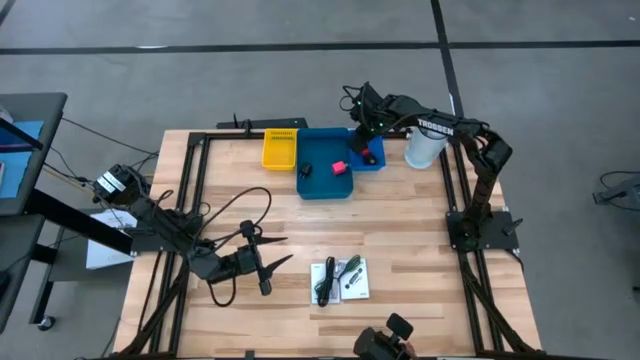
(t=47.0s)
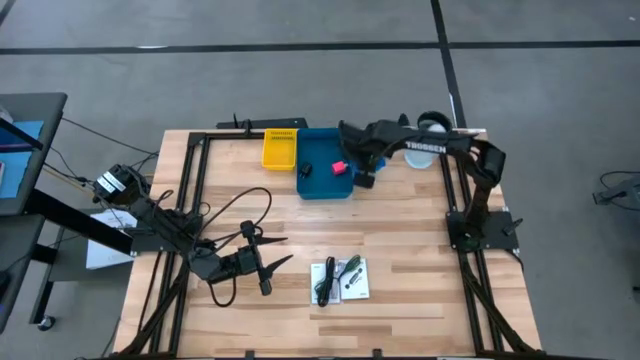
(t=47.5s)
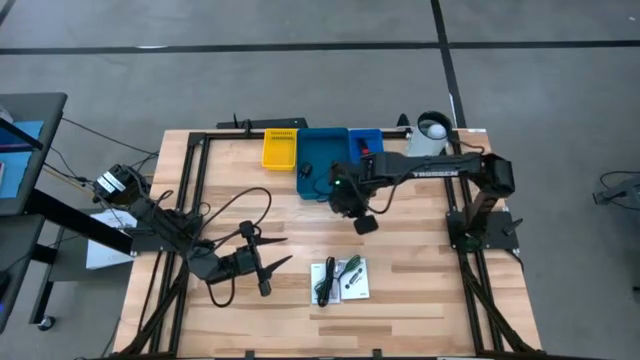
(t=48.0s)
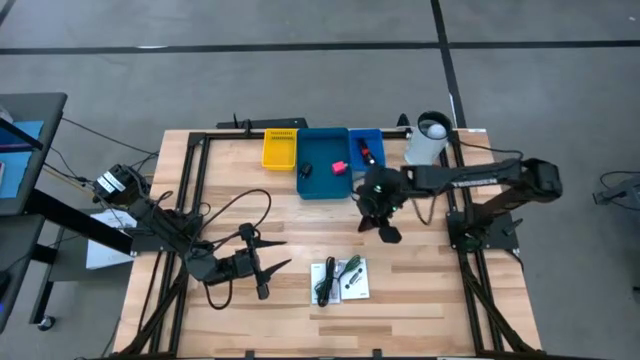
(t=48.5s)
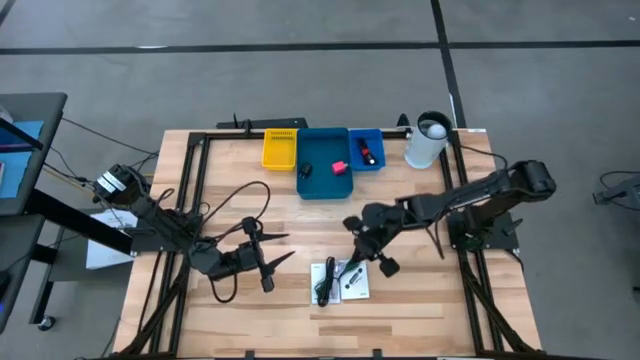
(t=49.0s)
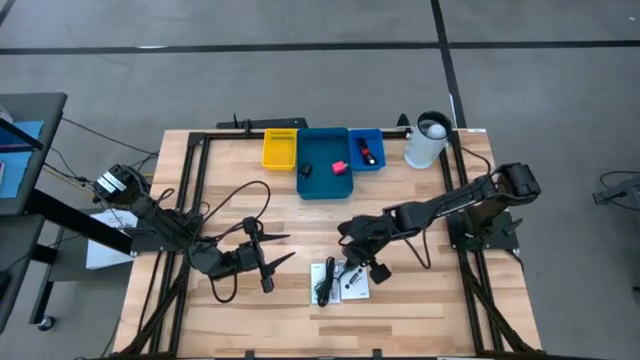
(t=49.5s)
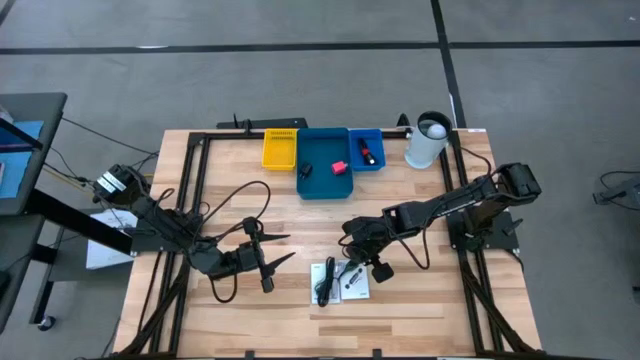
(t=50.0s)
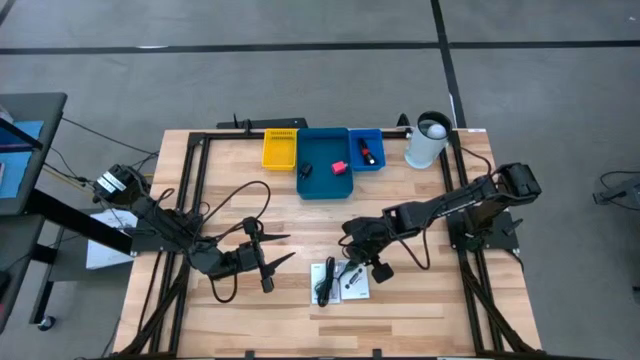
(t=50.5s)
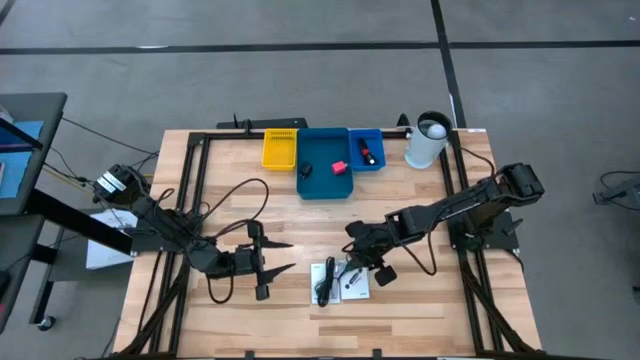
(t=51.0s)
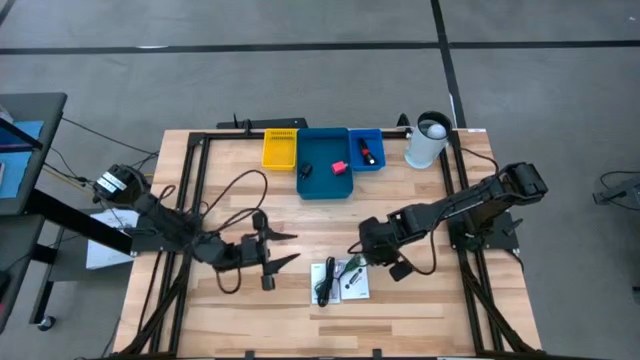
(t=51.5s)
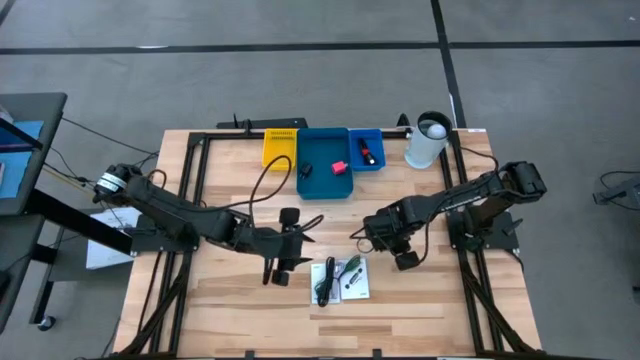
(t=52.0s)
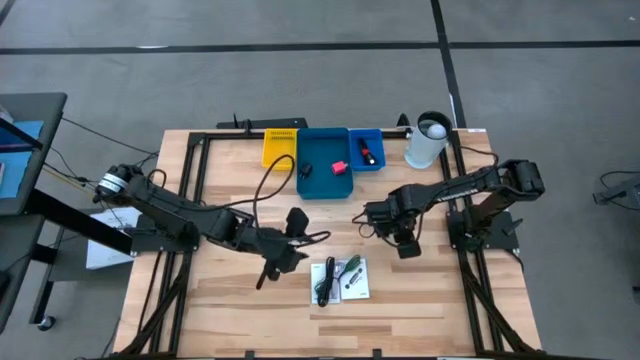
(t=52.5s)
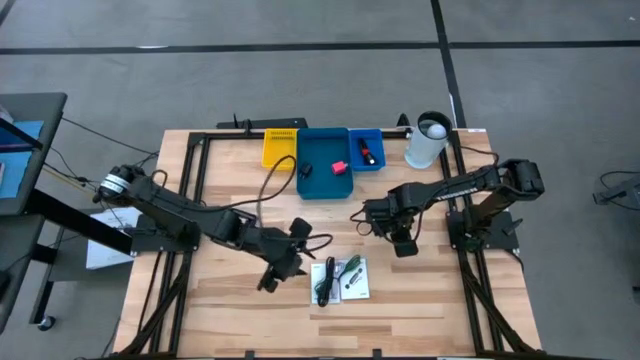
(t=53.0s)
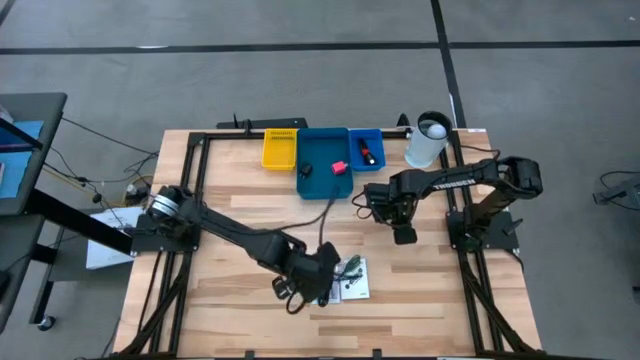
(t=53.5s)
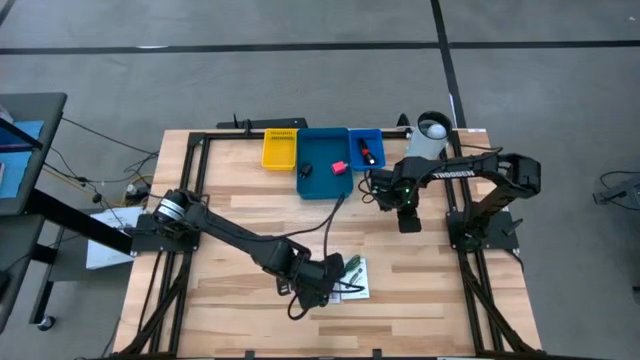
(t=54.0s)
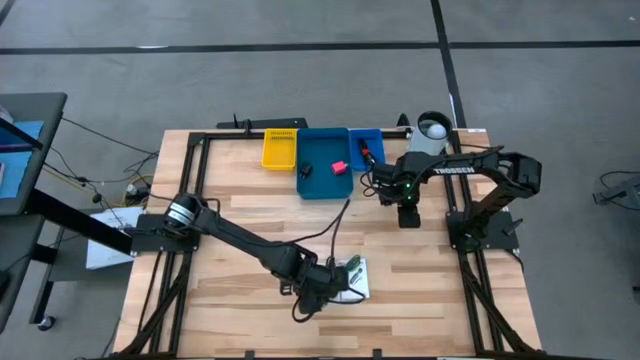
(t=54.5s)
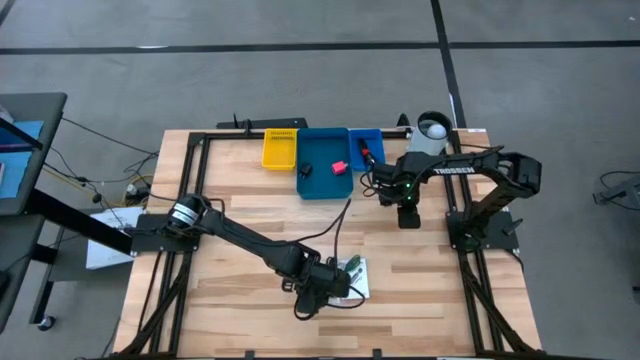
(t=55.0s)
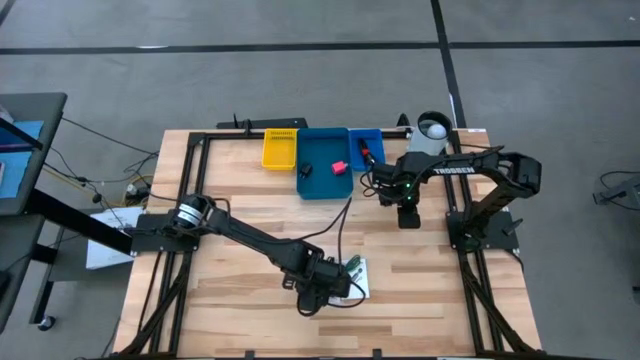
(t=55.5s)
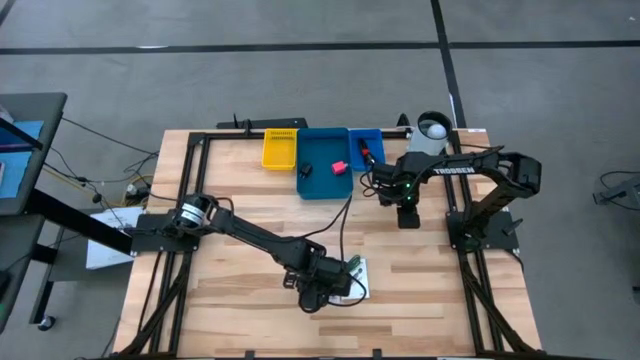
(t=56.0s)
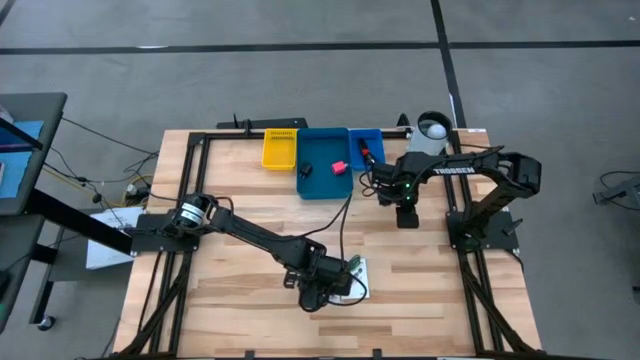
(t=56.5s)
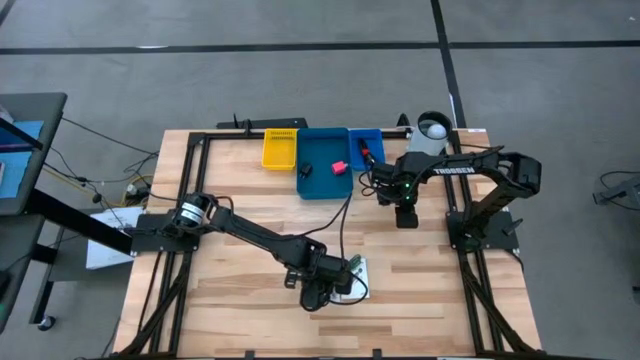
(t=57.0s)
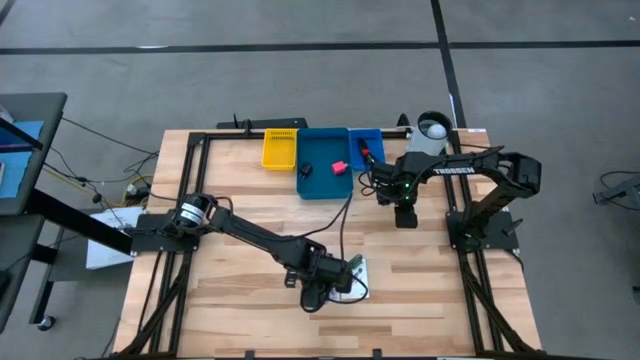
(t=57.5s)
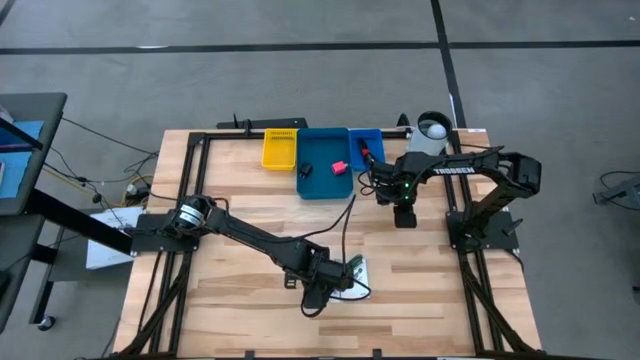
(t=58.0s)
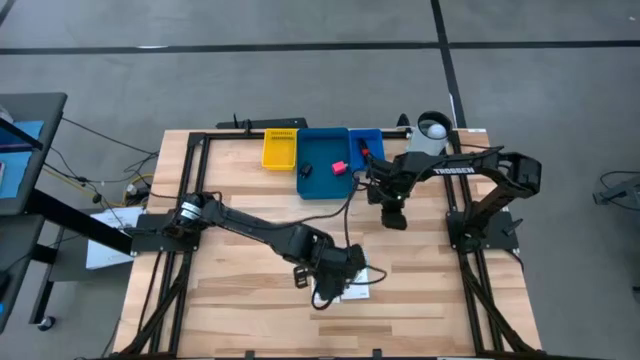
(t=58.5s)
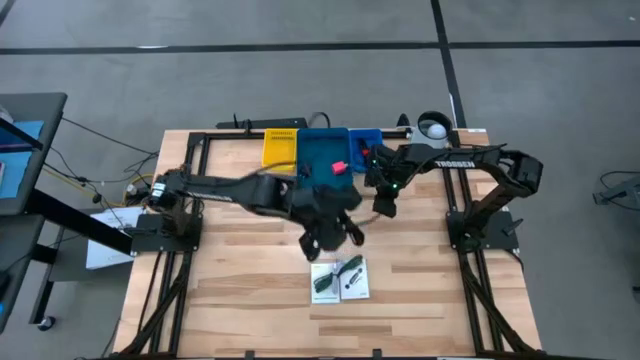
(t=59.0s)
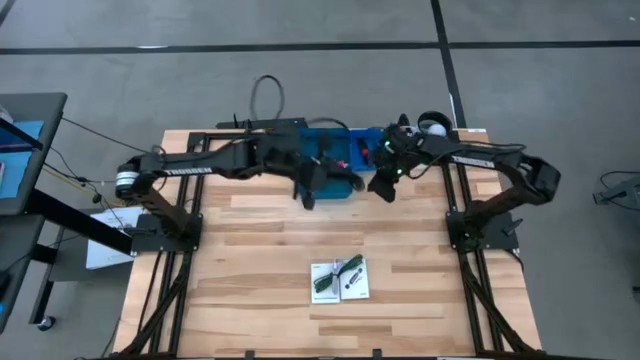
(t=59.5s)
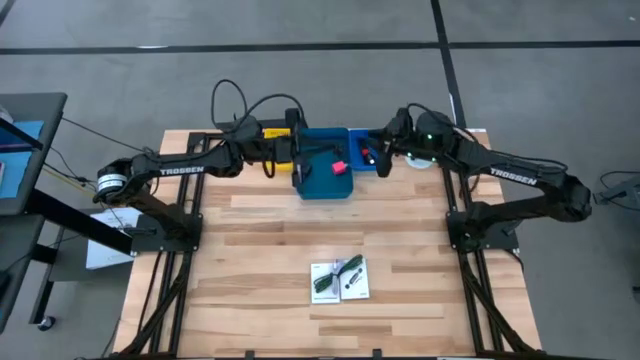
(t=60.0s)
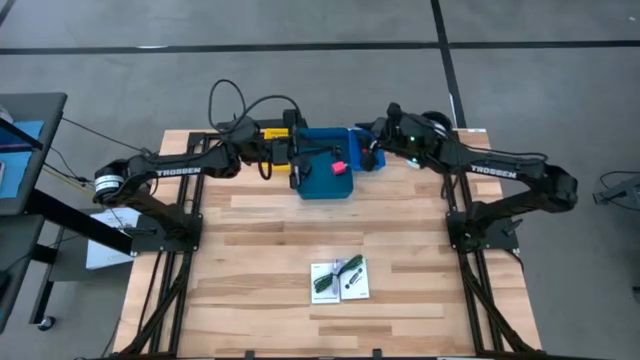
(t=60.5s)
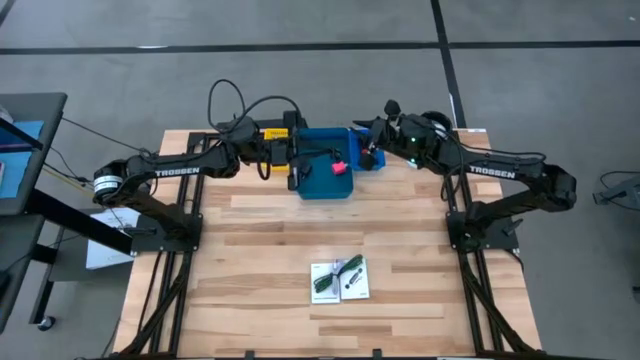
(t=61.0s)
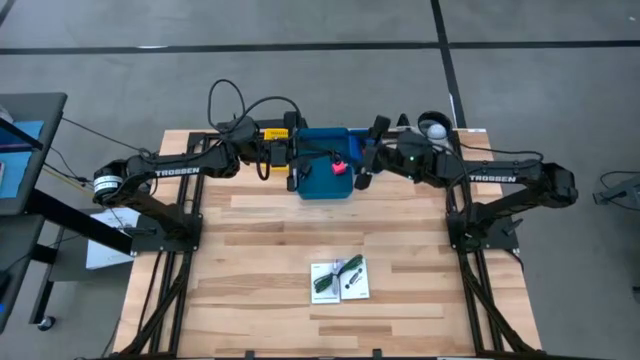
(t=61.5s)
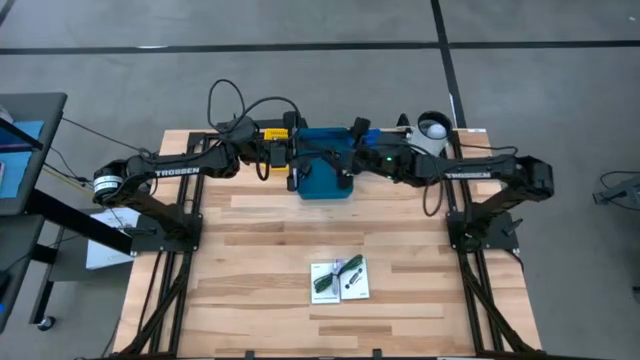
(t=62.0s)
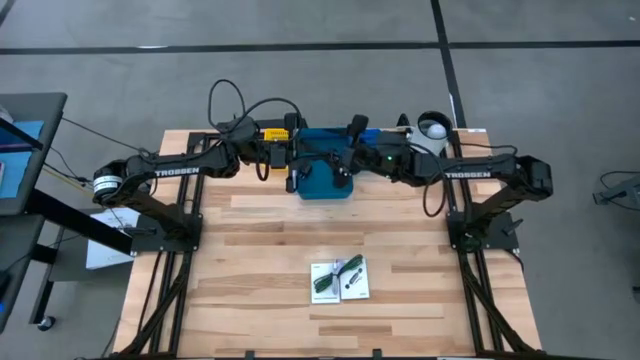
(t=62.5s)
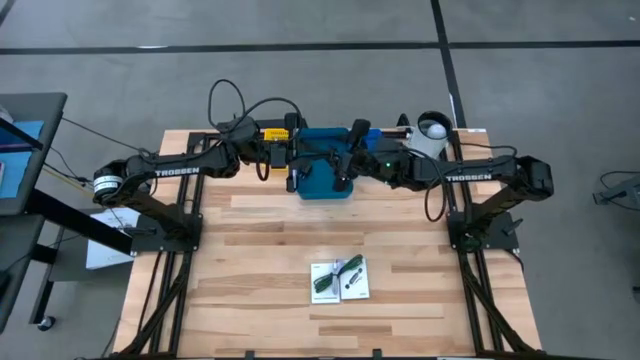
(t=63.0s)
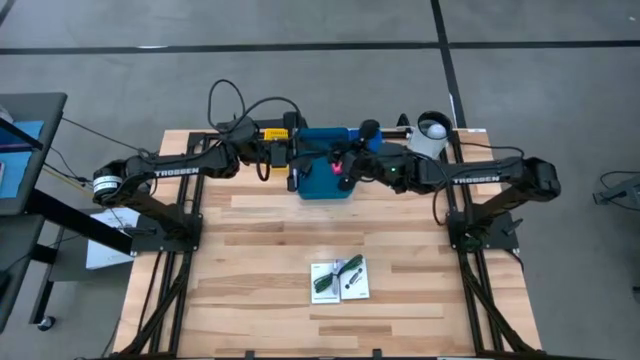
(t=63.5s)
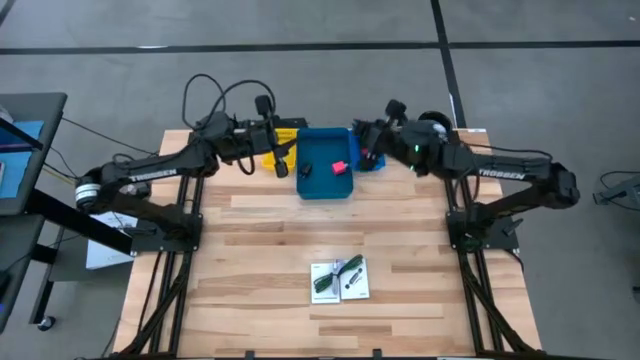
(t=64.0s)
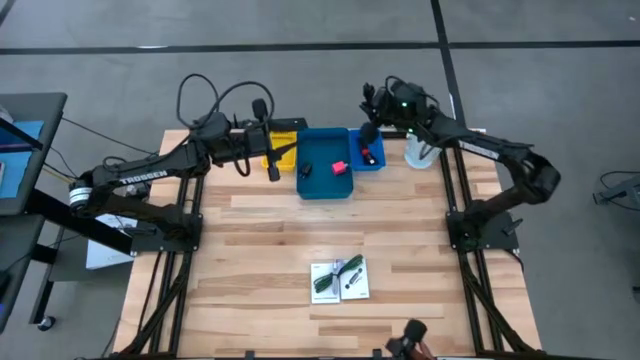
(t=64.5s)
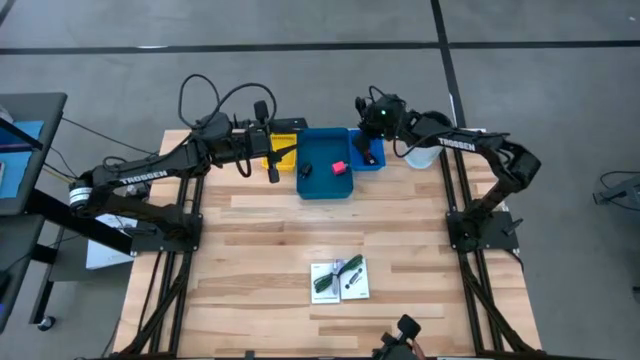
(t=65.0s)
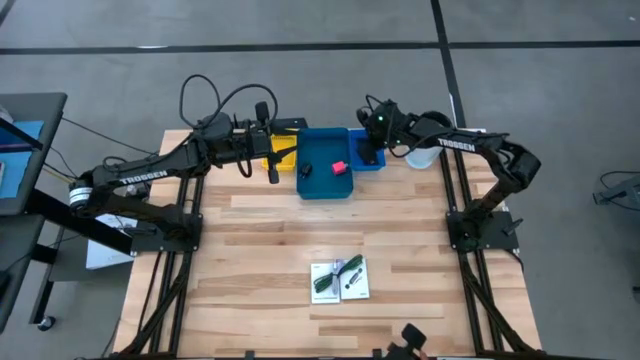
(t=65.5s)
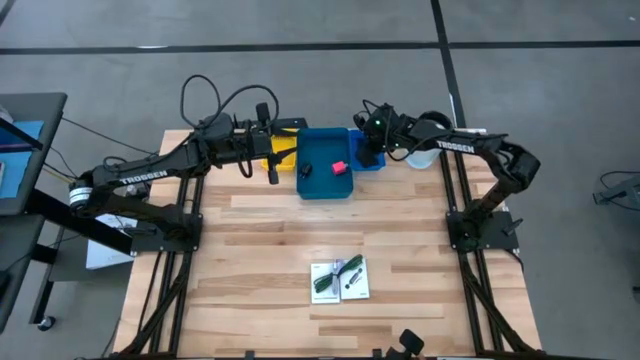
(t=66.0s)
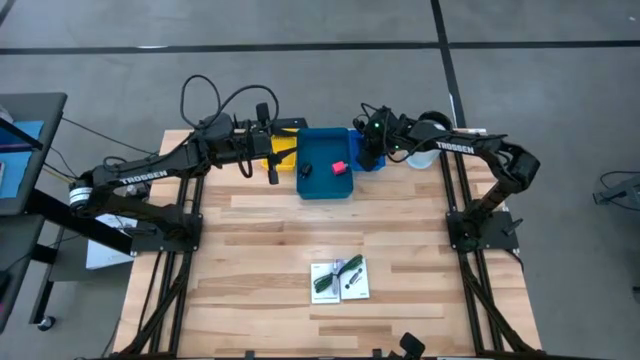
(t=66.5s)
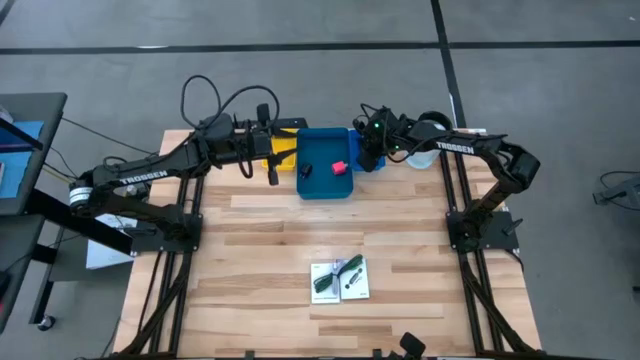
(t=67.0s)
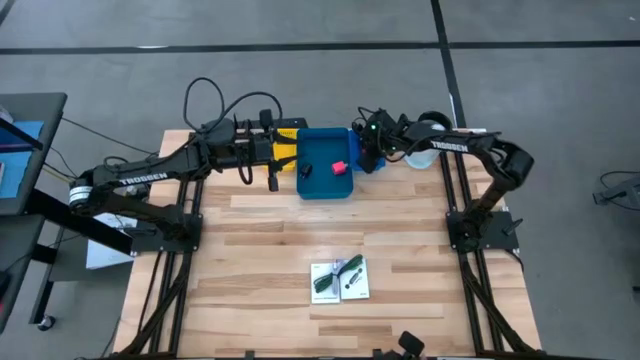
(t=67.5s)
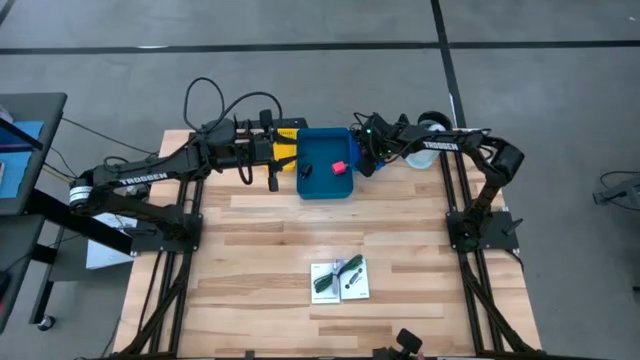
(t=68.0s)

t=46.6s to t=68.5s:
Task: Pick and place items into bin
Put the black charger cable into the blue basket
